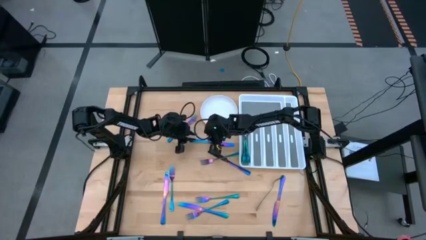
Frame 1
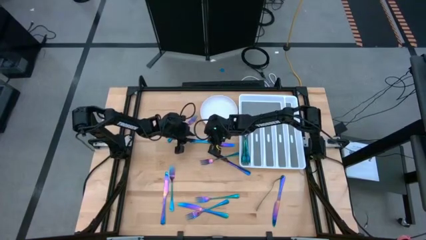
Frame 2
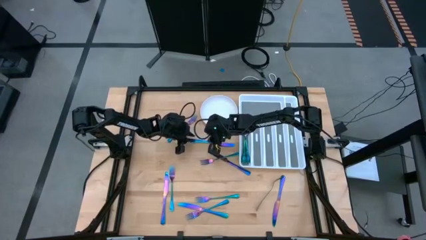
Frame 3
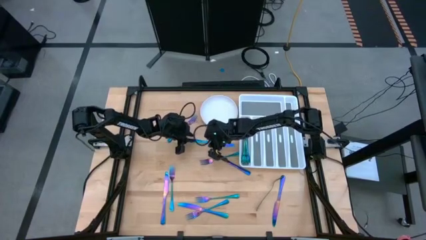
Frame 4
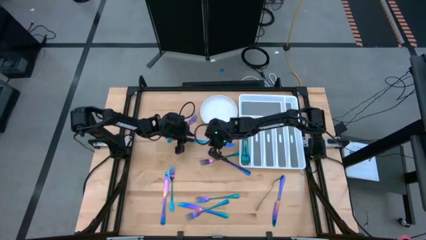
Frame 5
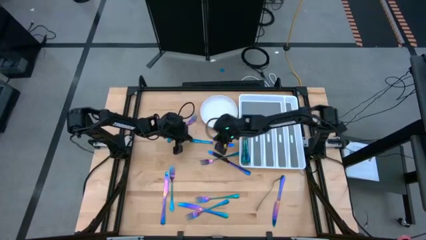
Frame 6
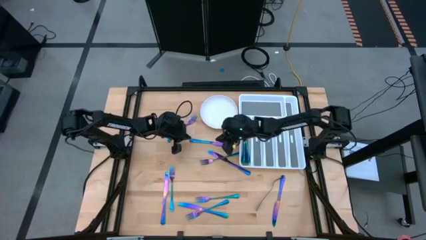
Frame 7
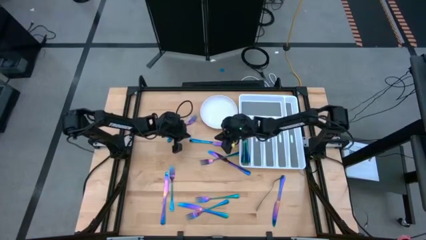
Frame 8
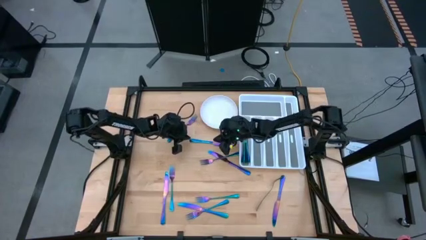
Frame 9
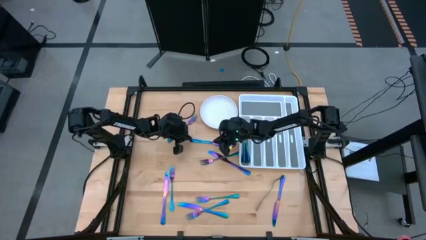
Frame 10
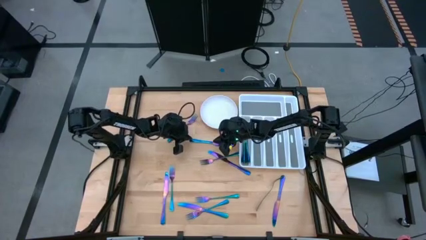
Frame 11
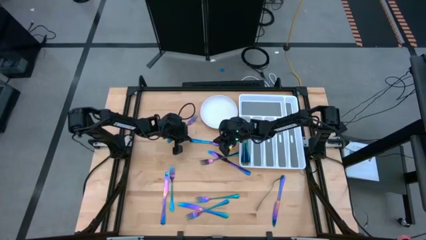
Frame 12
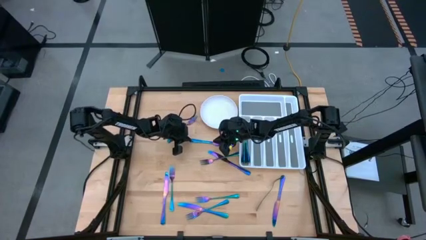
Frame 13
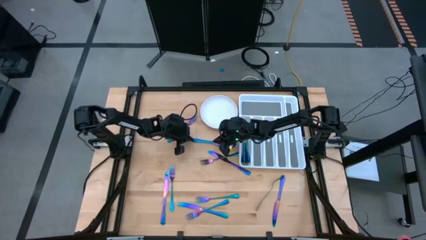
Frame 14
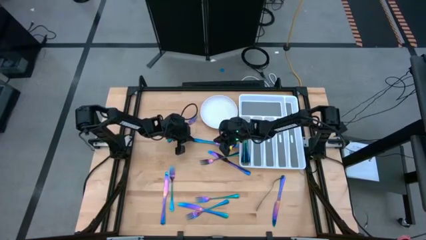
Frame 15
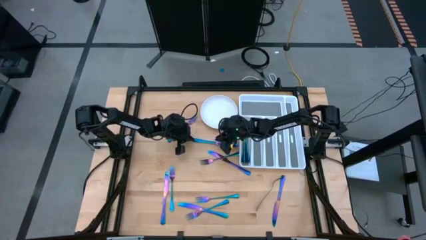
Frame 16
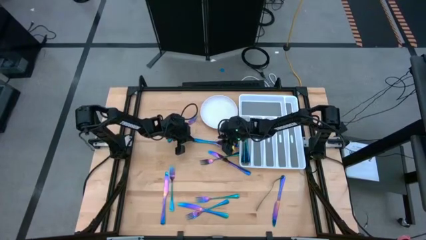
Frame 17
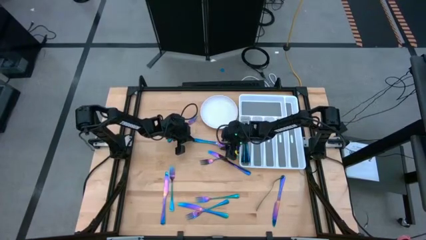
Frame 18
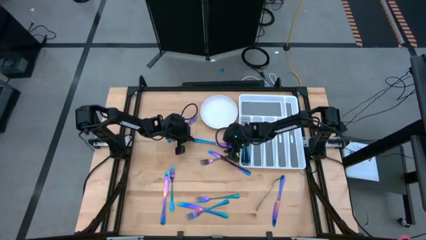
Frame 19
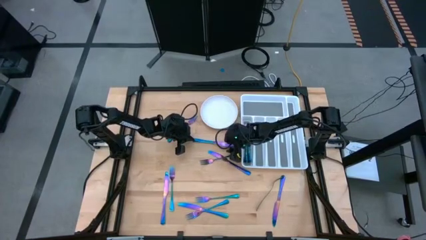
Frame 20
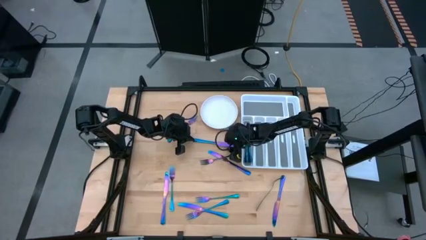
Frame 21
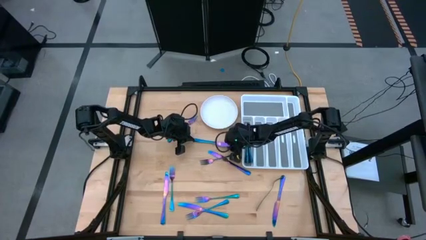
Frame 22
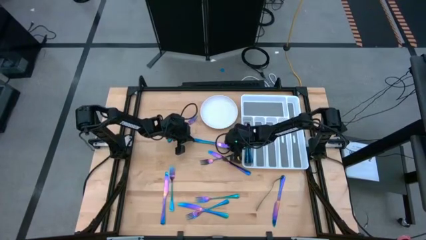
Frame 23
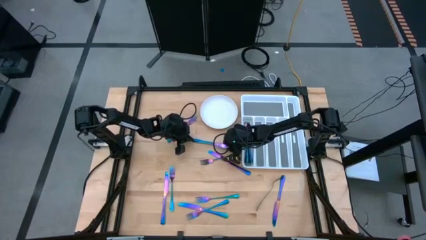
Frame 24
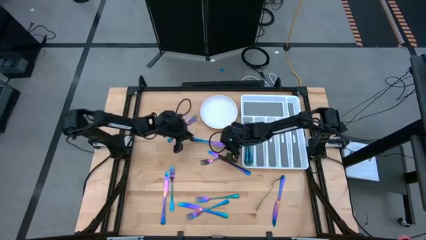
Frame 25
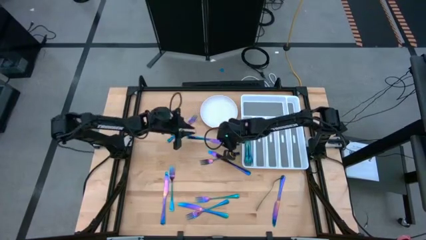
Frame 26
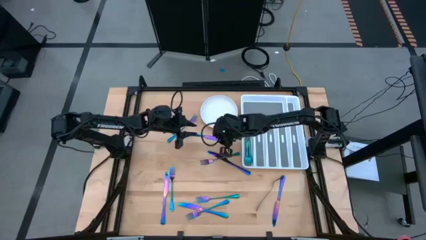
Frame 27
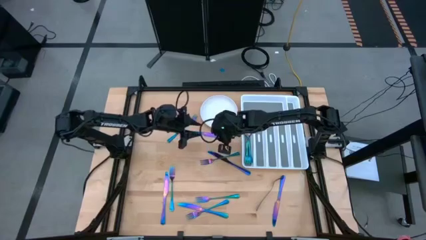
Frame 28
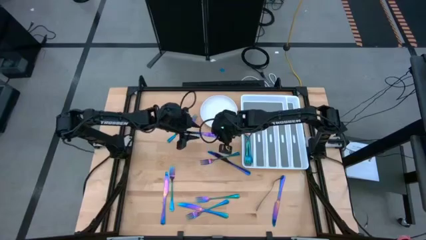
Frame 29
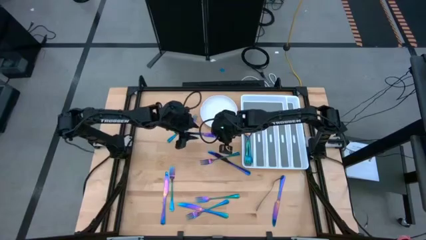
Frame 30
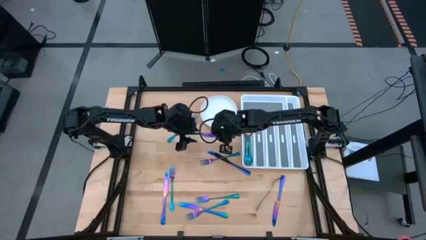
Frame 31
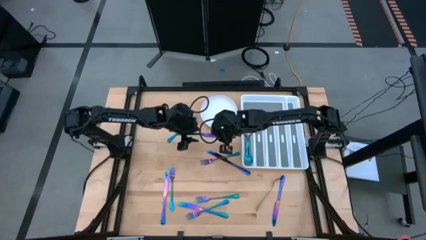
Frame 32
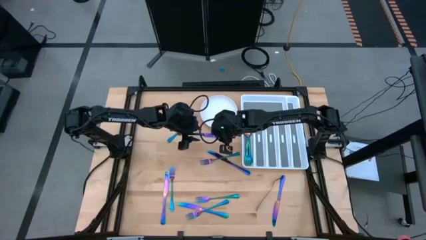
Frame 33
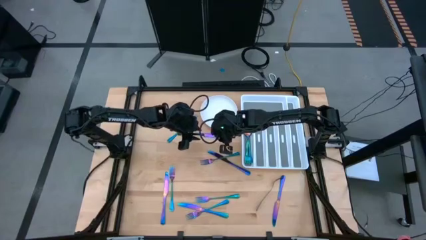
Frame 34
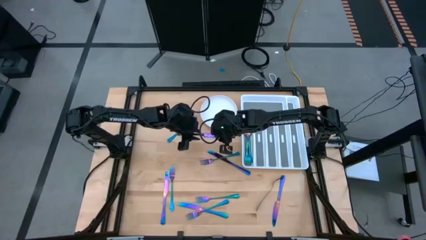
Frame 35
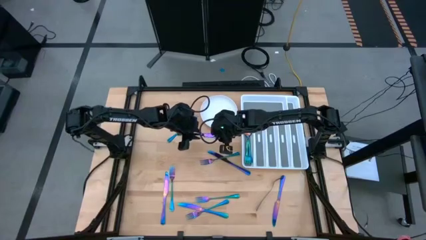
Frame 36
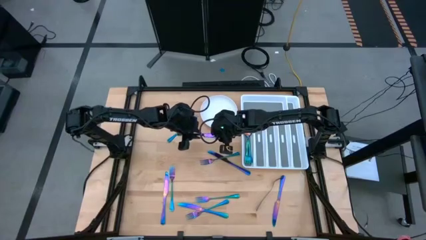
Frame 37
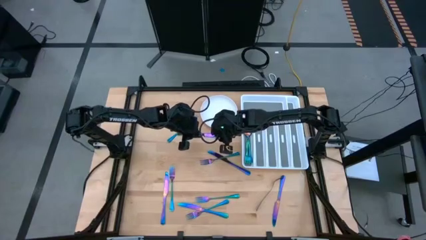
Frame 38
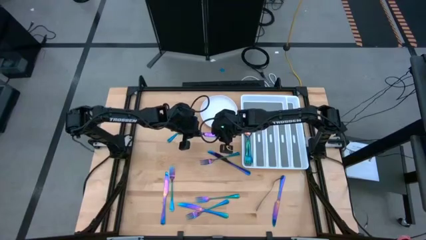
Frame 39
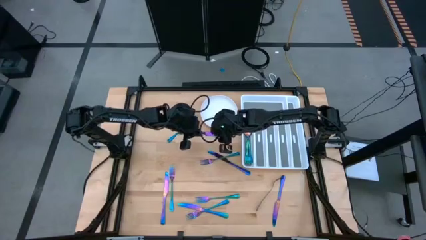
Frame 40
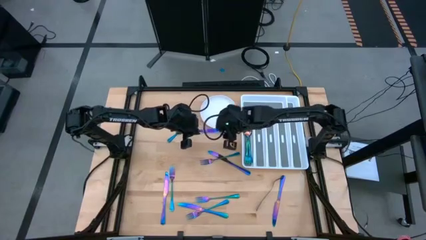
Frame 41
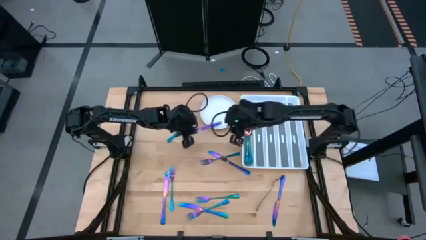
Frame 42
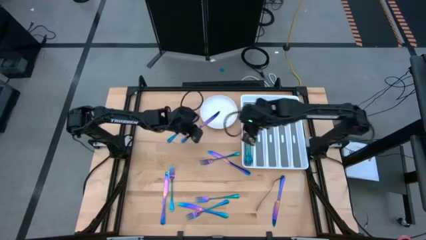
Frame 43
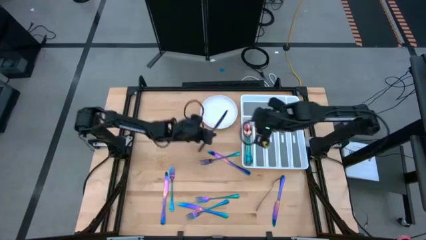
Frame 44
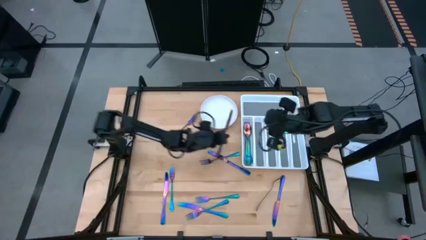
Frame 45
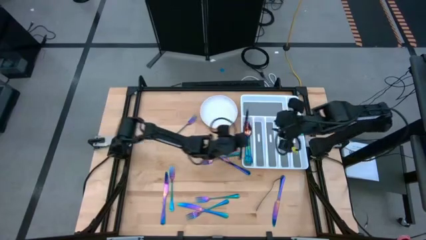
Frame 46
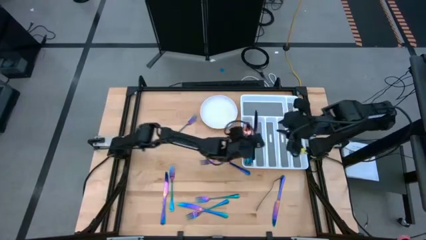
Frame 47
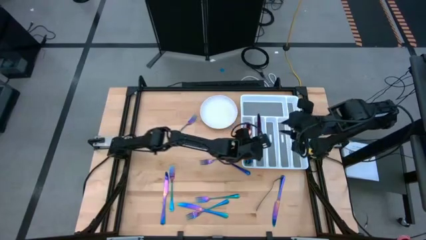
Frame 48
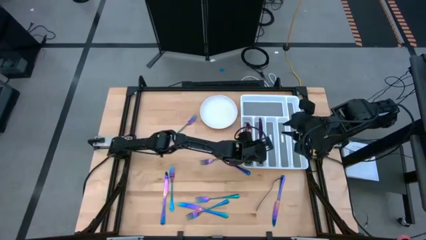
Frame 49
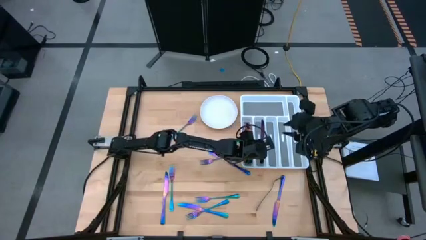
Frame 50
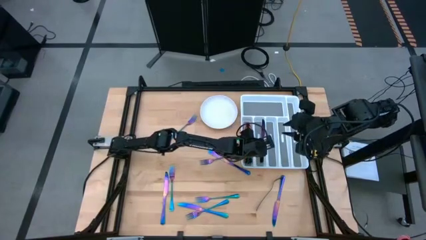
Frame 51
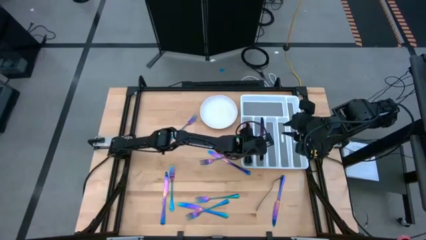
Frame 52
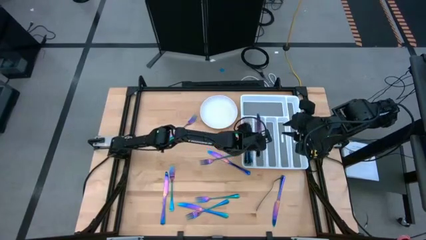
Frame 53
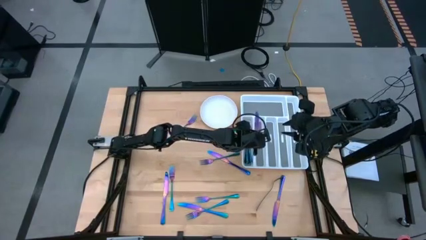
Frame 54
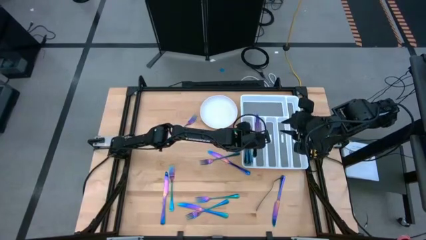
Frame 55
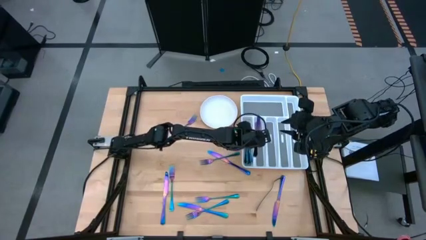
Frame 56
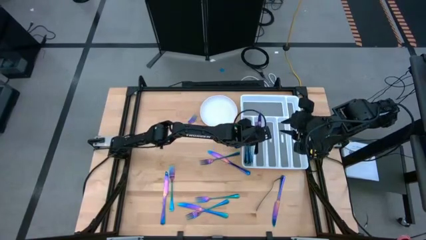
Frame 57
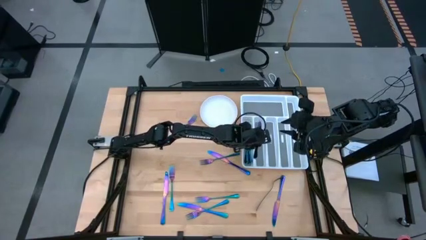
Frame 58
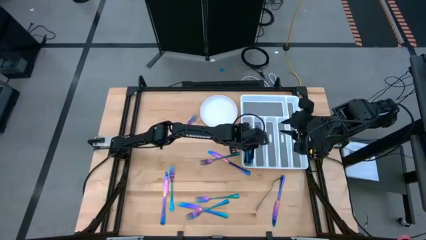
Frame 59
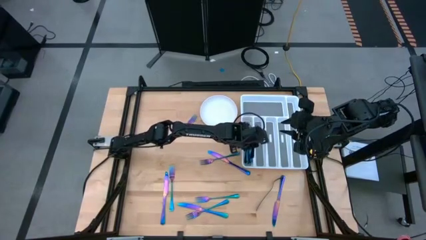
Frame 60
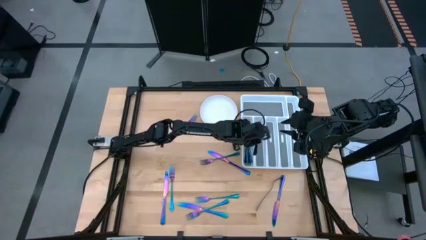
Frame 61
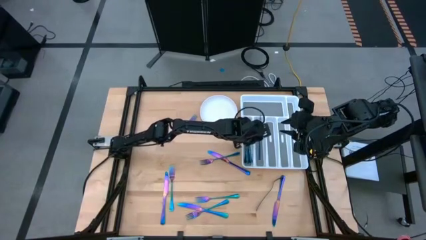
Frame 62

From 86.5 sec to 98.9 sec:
Task: Sort silverware
Put the purple knife on the white silverware tray

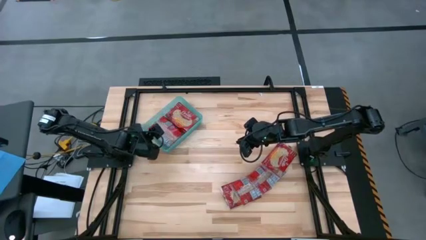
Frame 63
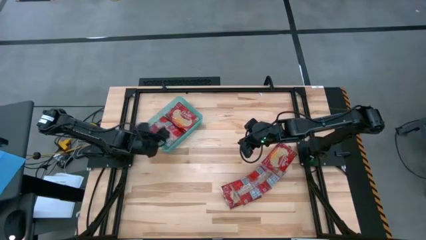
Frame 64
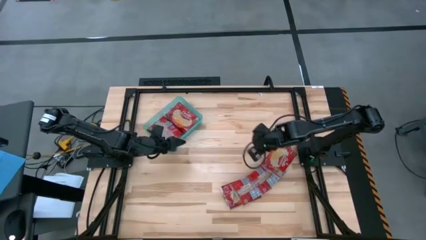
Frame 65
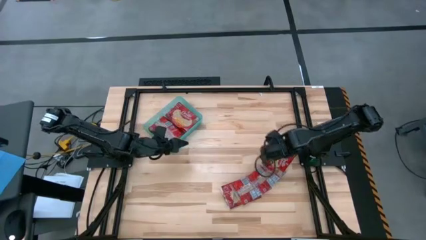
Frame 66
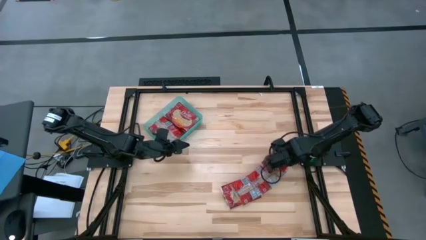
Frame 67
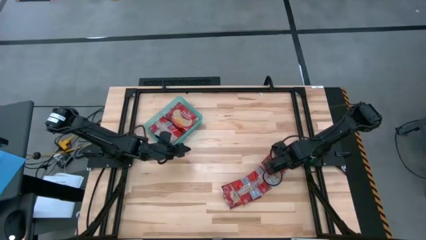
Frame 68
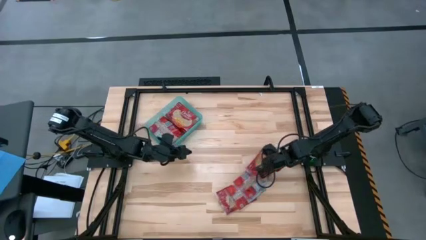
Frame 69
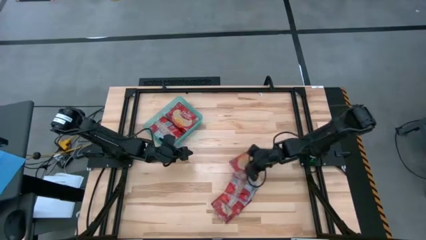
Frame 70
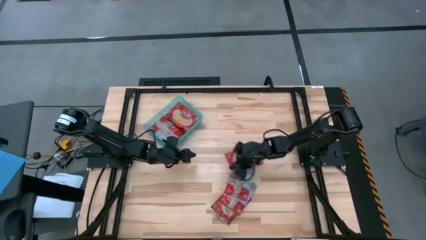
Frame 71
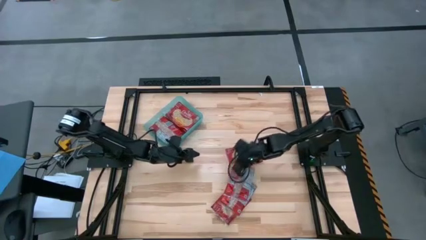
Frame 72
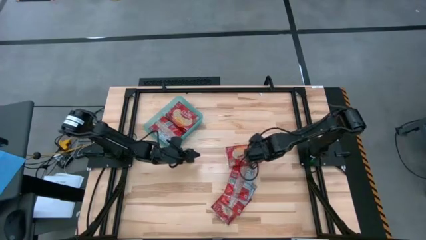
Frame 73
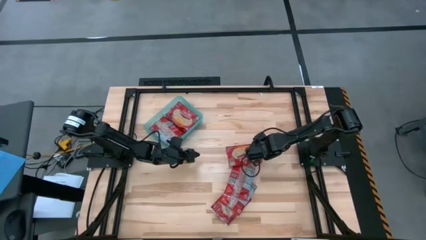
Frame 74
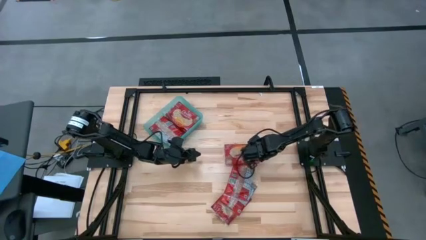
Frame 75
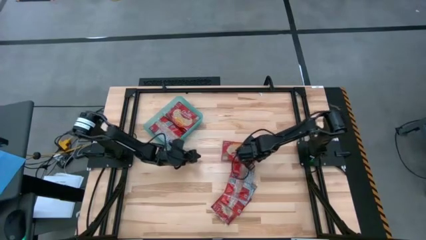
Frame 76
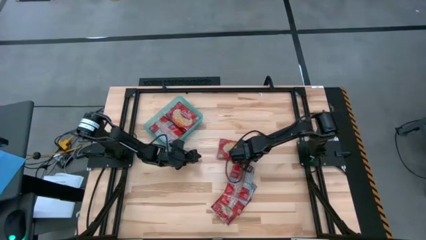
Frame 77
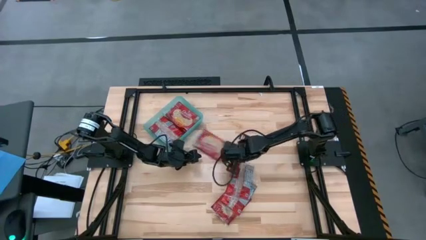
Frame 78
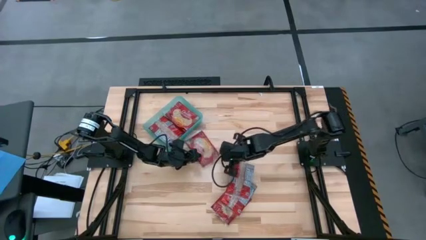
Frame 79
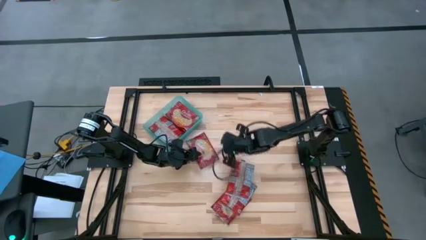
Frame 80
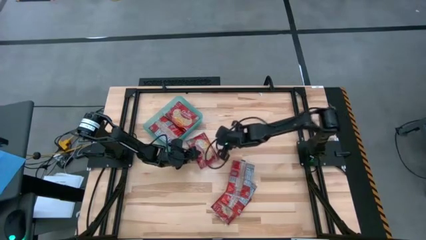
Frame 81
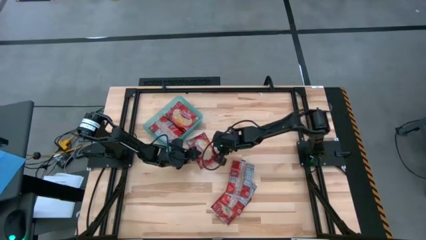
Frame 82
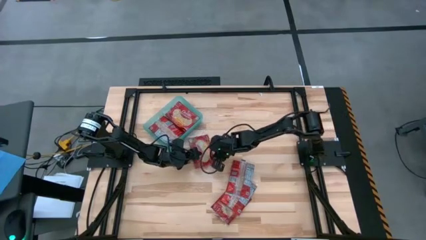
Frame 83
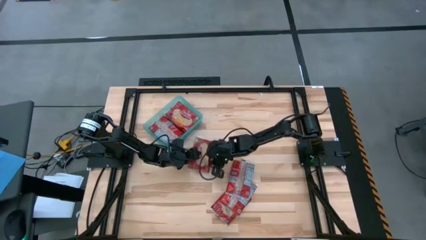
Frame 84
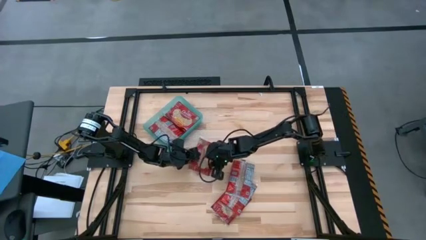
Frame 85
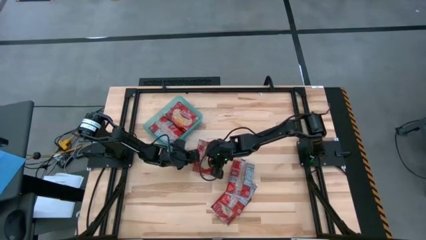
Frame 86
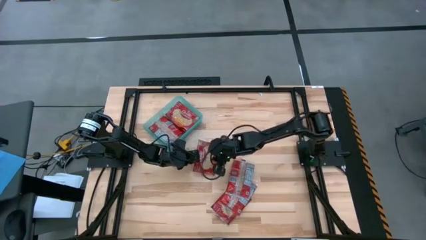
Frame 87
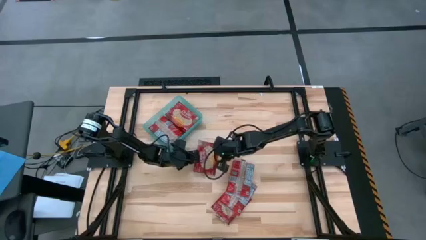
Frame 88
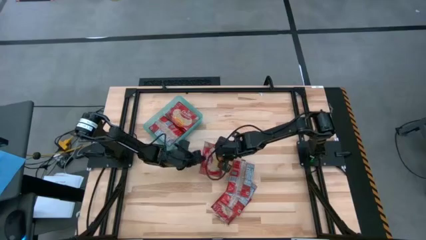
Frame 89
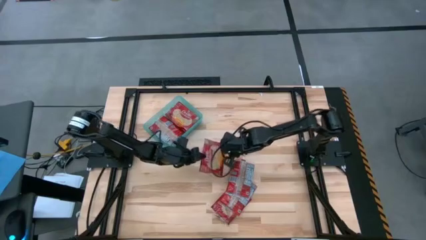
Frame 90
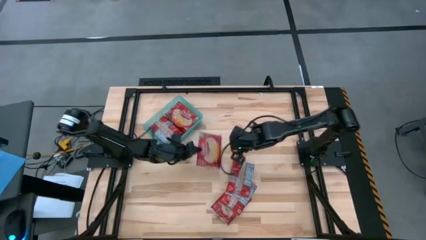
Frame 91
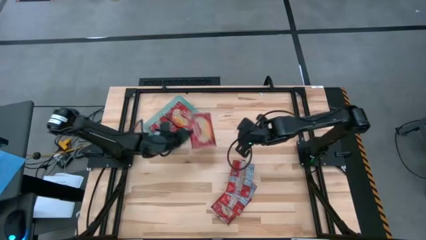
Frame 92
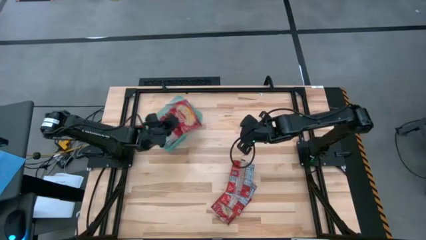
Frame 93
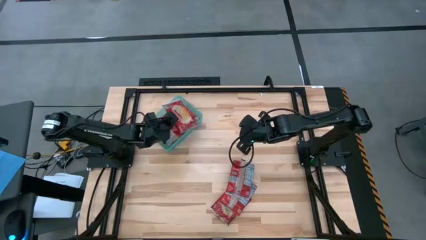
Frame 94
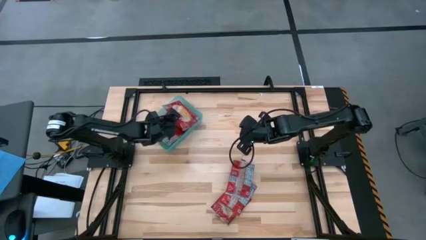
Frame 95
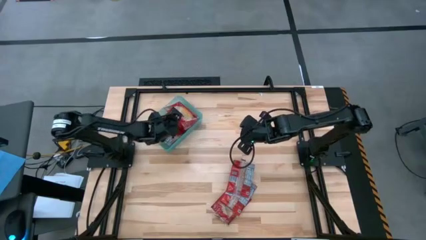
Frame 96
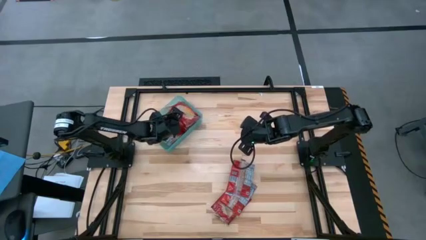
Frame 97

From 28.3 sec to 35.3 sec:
Task: Sort popcorn bags into baskets
Put the red popcorn bag into the blue bin
